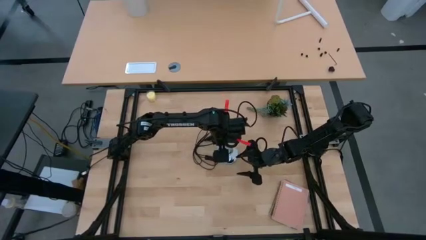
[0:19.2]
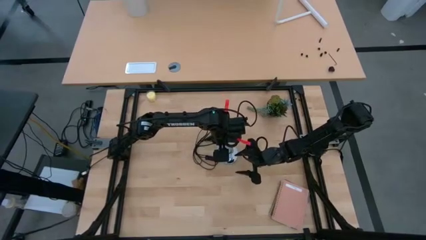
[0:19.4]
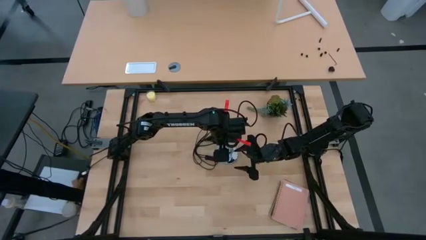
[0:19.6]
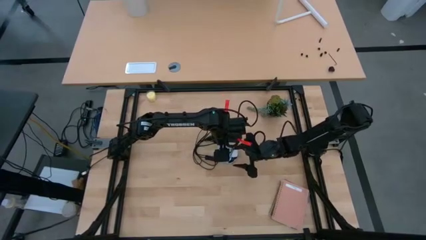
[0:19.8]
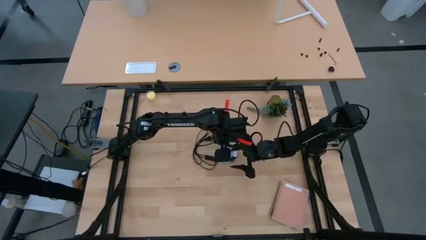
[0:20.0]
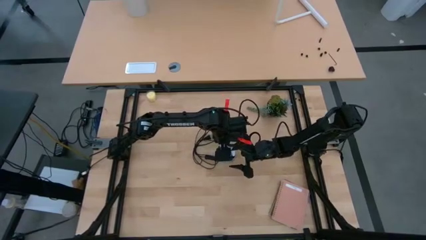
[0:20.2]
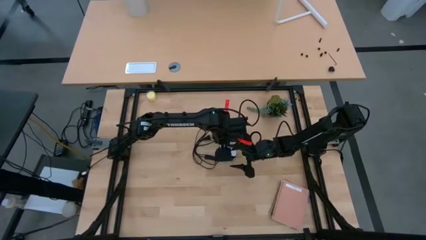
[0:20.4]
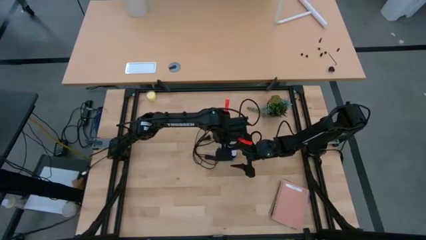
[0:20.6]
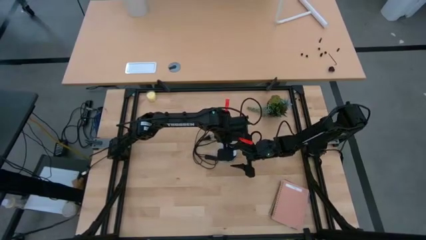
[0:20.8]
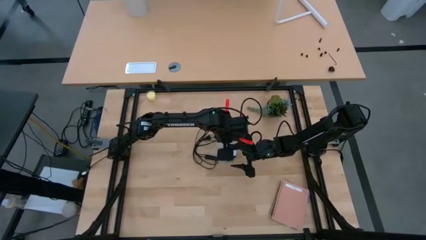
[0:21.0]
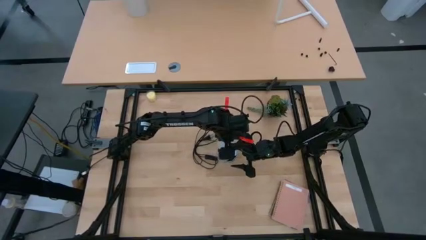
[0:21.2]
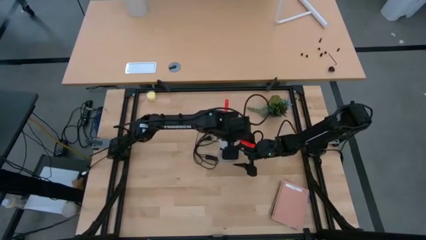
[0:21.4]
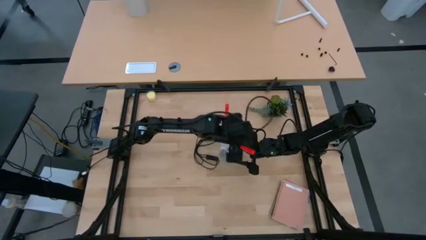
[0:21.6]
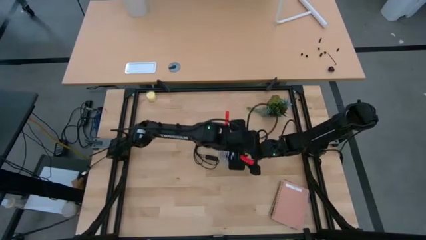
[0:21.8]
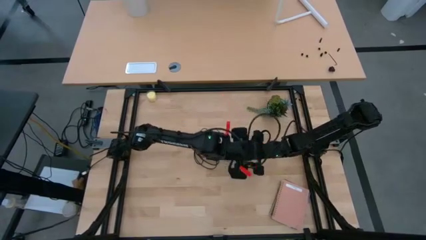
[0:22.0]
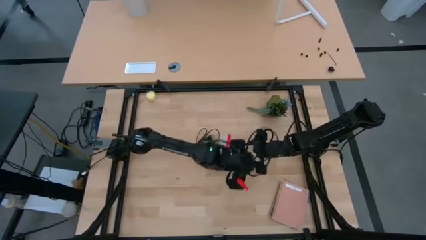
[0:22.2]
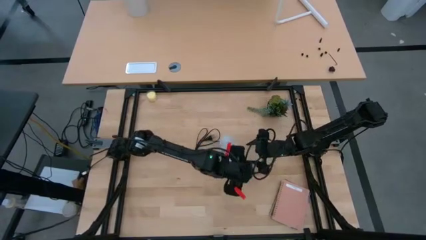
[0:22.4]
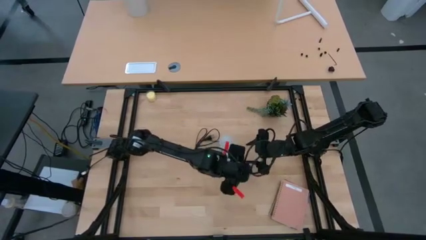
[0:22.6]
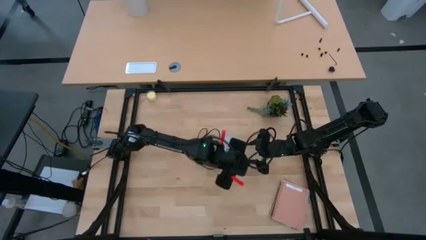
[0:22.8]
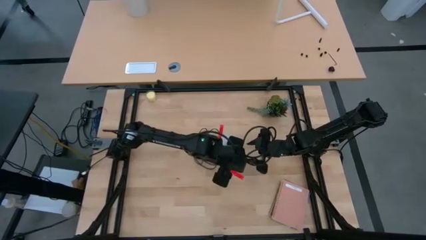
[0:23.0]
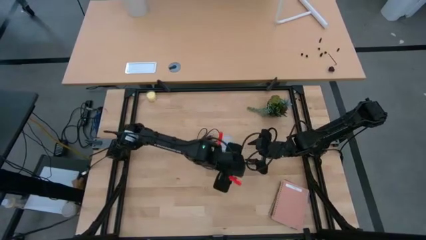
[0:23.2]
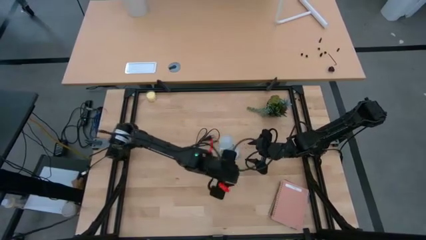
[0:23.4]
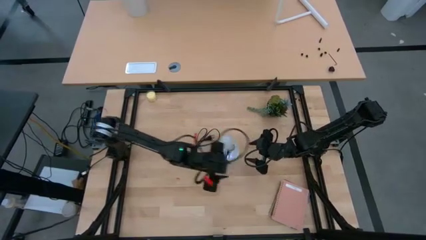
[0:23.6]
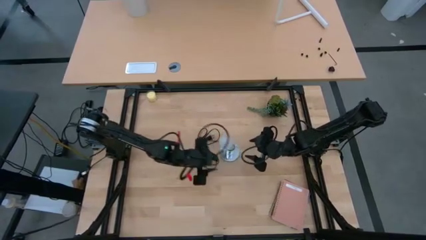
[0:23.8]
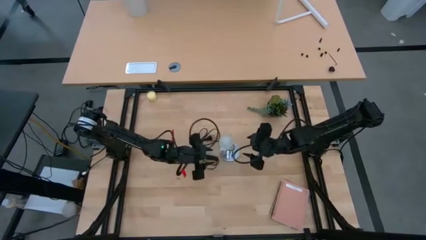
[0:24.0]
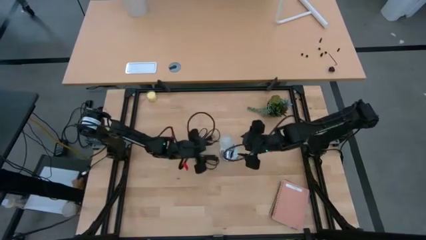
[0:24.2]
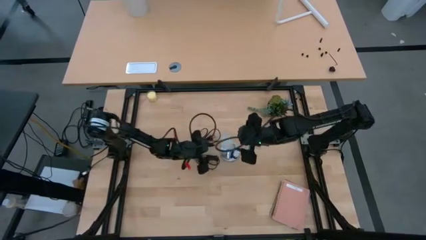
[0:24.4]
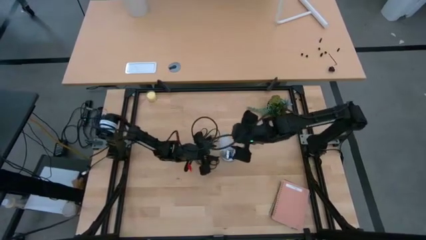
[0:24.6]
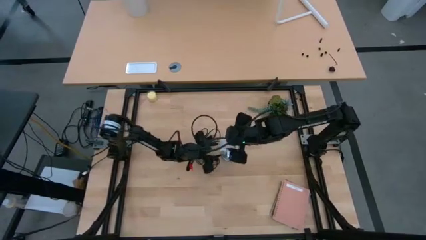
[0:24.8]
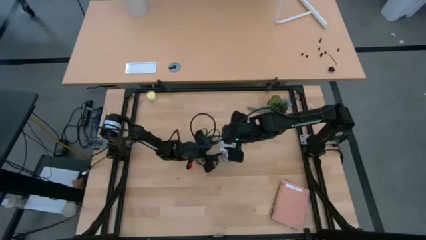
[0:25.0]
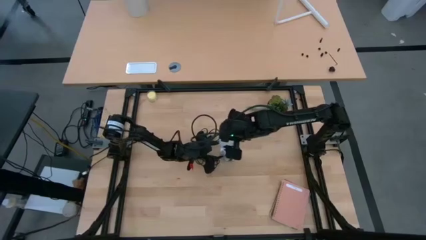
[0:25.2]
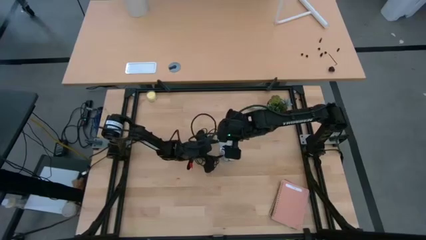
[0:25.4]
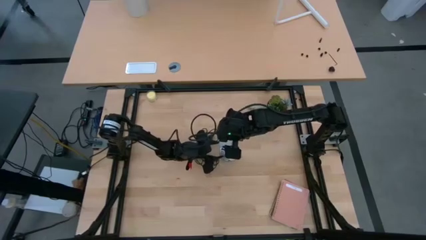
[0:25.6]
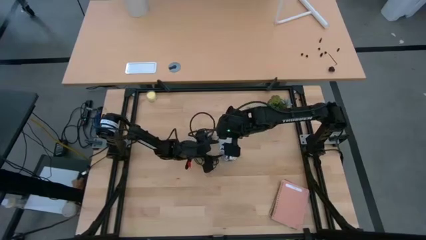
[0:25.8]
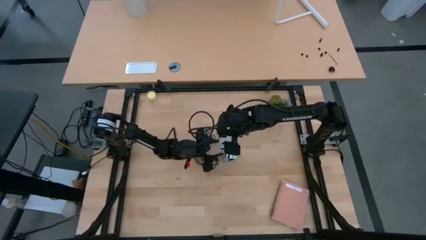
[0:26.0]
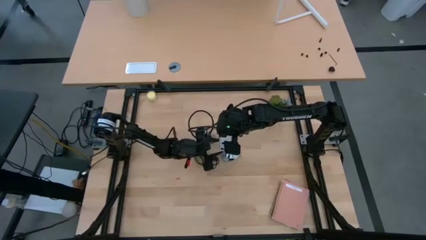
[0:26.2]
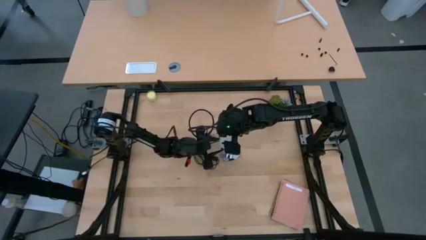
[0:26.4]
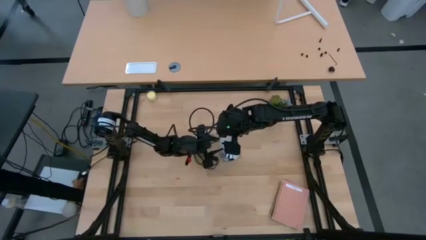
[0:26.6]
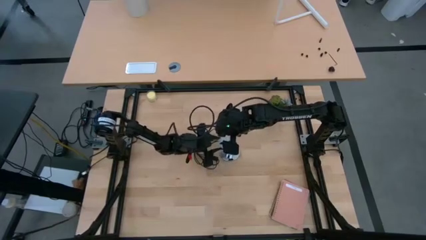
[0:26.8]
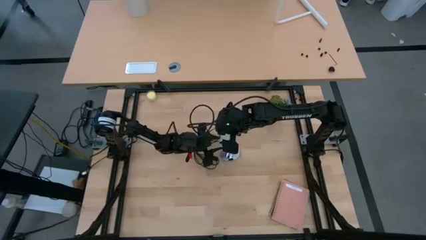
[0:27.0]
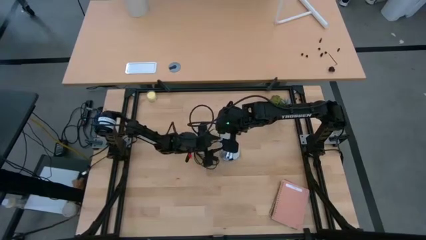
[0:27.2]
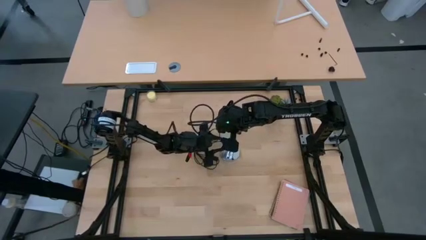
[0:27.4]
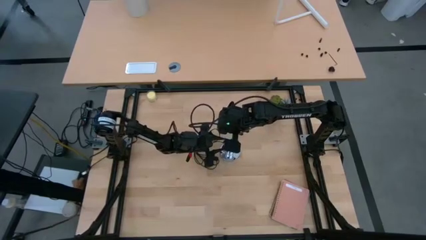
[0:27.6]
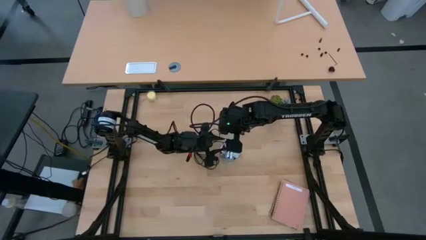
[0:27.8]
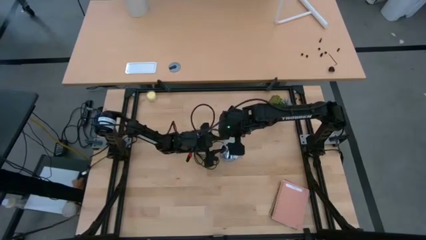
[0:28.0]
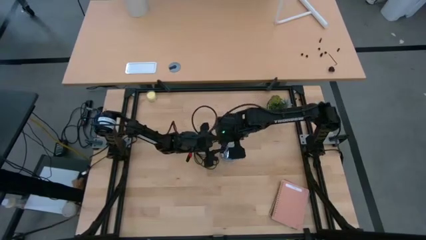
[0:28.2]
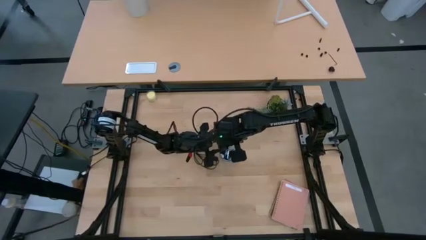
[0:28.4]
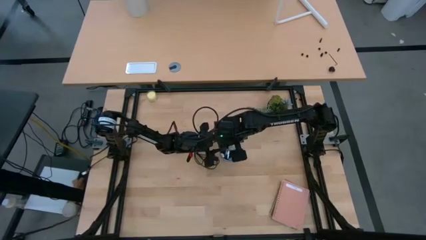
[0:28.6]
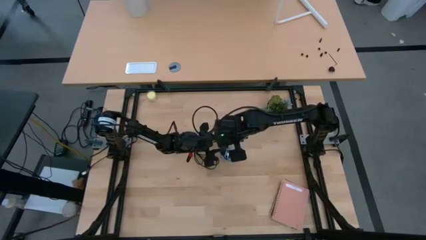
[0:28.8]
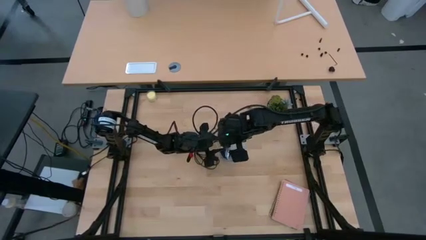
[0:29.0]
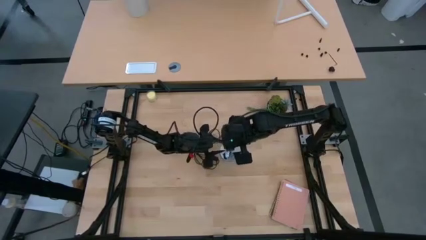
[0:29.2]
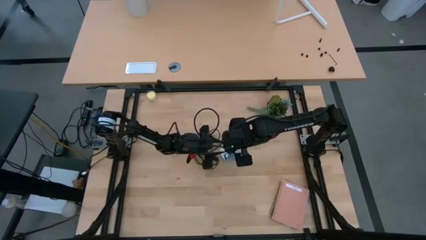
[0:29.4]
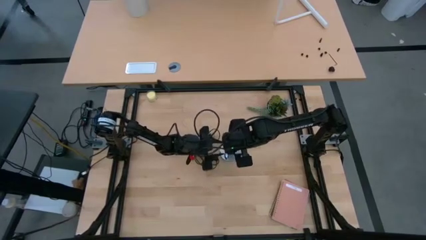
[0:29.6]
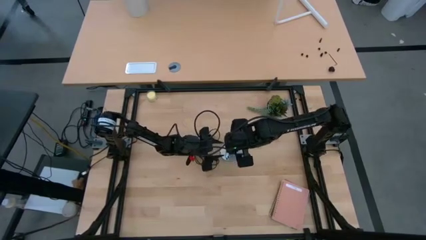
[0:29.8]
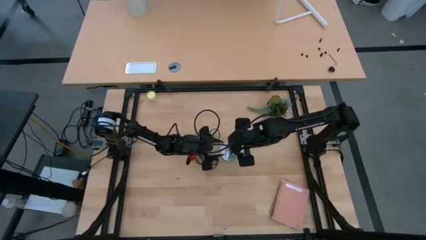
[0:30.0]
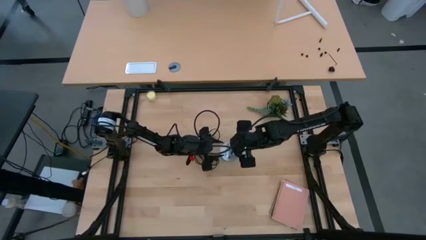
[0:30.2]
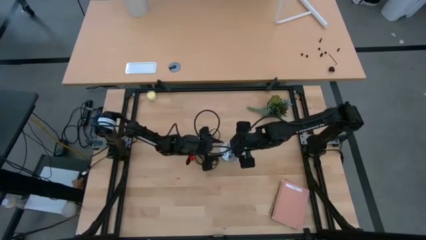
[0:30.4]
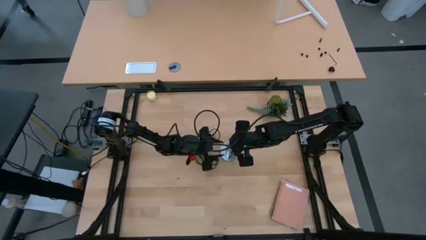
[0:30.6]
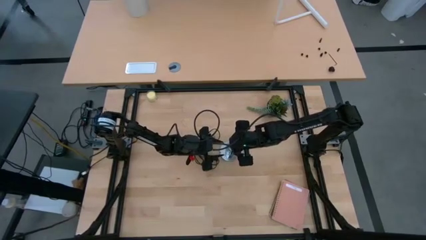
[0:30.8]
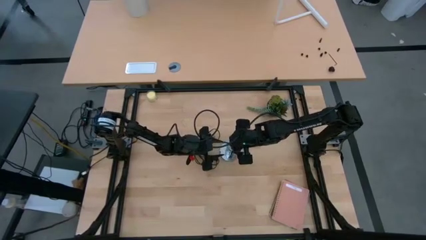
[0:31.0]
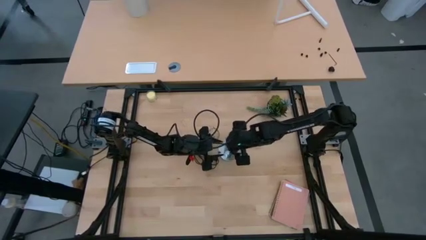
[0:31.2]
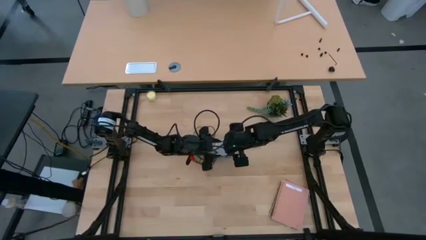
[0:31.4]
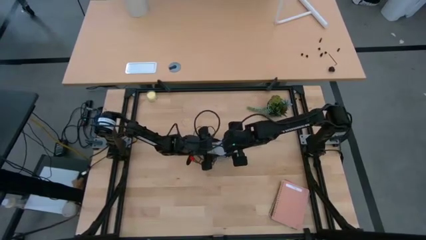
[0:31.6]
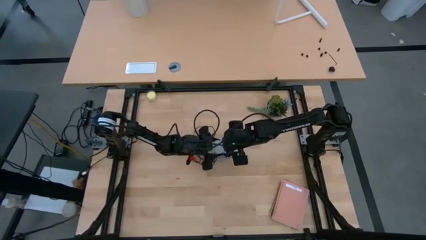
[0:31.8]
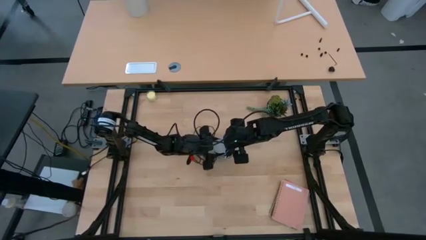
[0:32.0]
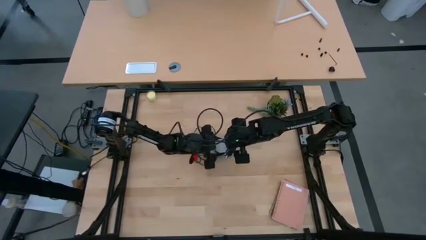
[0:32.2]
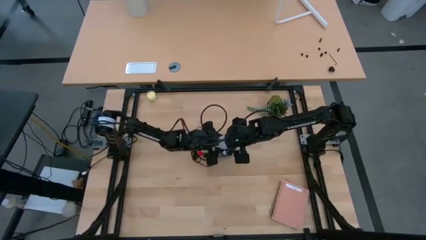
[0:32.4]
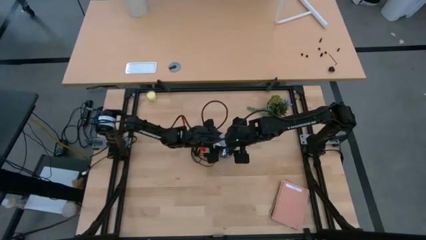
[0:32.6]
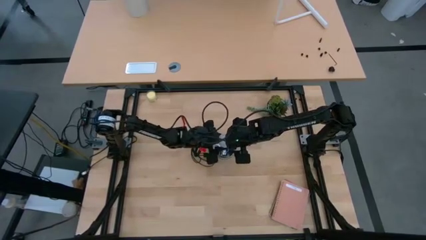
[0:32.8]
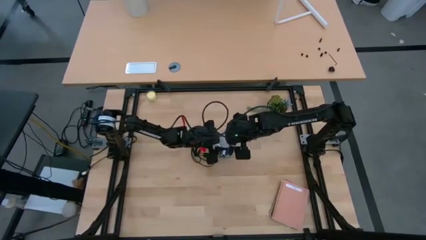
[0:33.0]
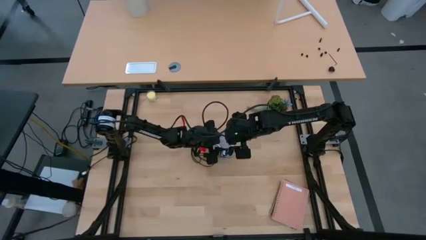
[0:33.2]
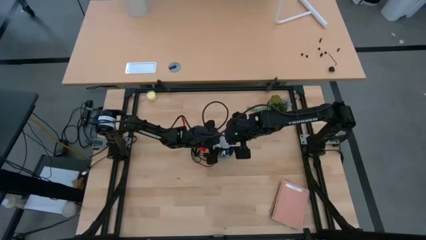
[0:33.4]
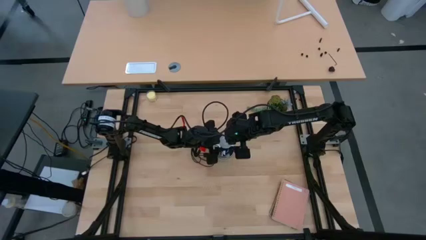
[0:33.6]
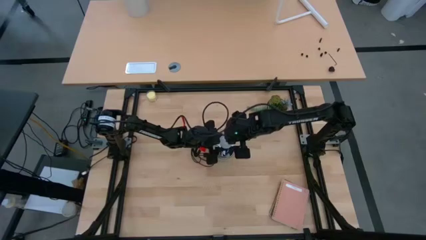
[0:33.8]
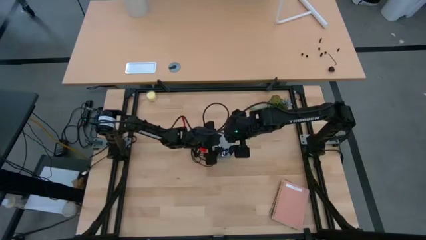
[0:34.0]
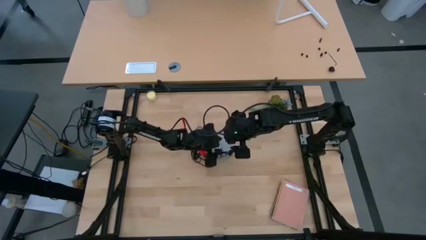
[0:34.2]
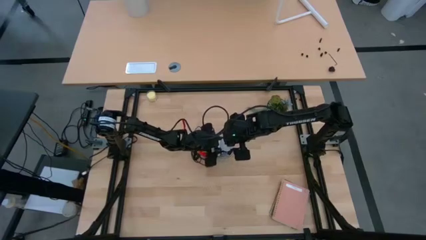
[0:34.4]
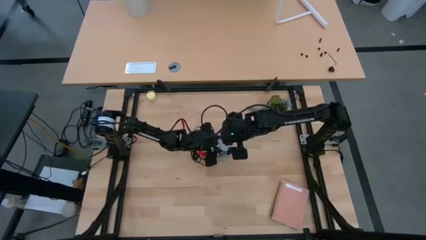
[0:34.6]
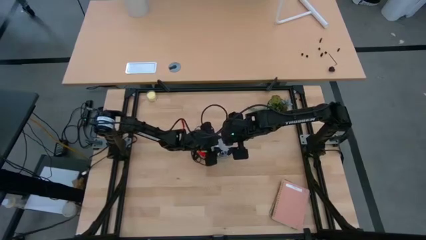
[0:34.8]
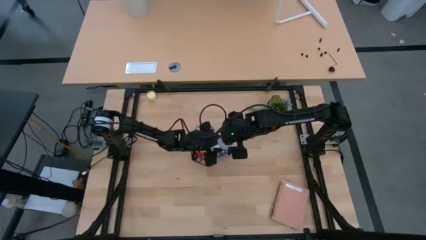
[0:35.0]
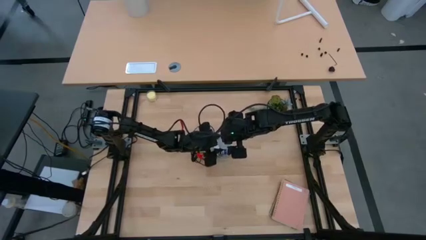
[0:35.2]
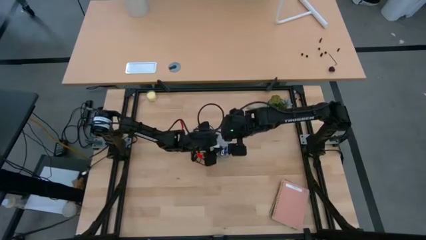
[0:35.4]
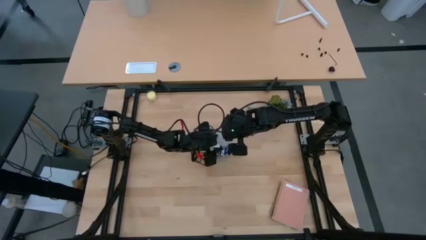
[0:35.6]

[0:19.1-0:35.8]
Task: Screw lightbulb
Insert the white lightbulb into the metallic lamp
